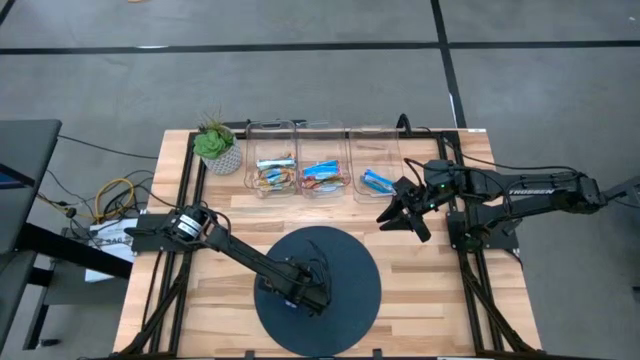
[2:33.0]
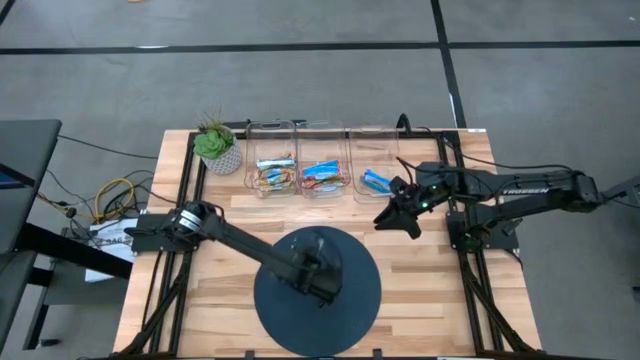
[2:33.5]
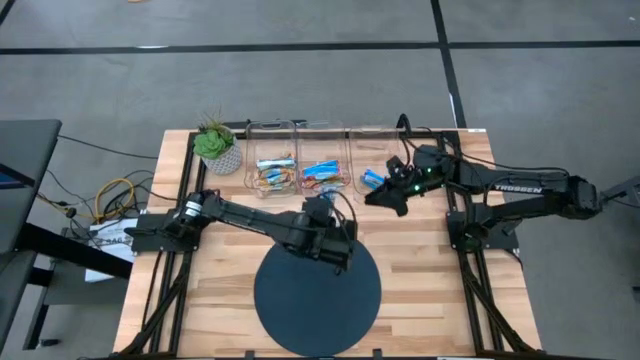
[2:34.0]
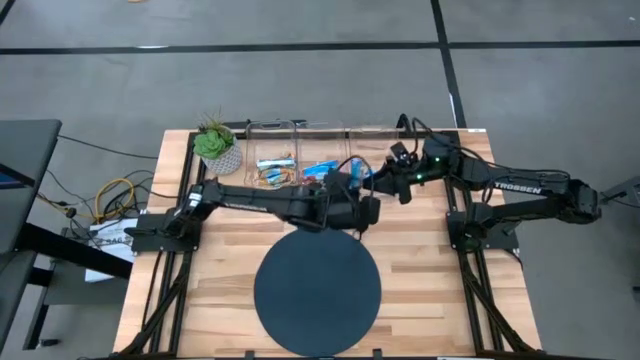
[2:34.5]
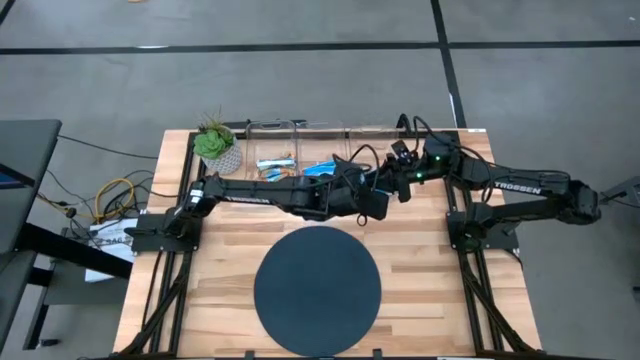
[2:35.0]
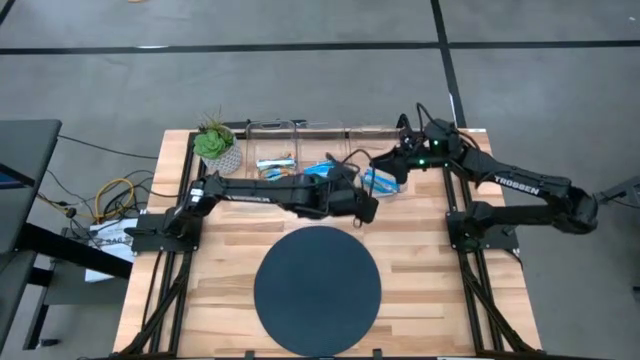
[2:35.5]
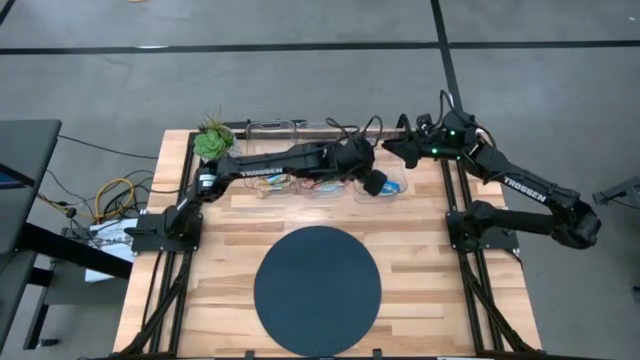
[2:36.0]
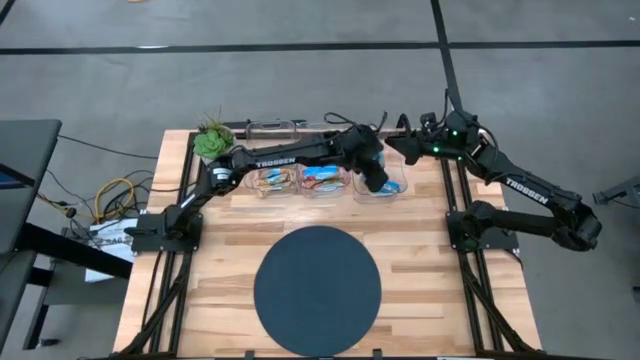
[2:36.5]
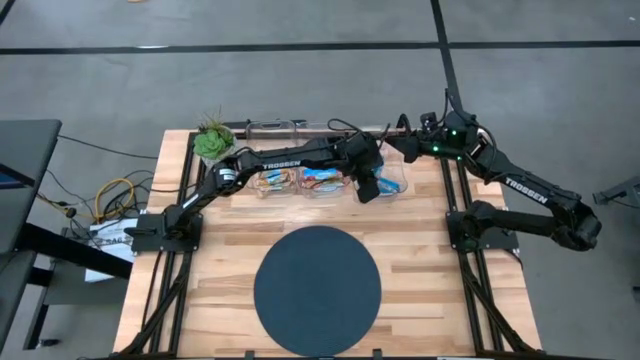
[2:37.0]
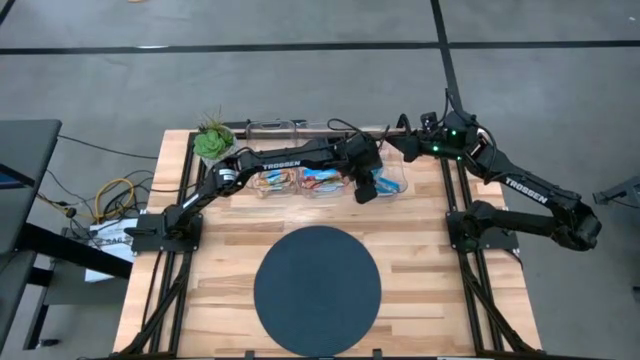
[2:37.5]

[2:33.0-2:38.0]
Task: Pick and place Granola Bars by type
Put the blue bar into the right transparent bin

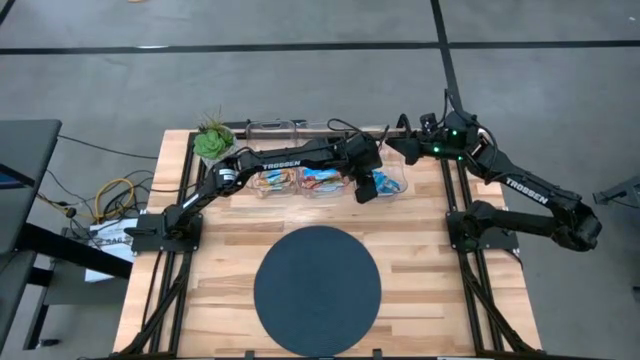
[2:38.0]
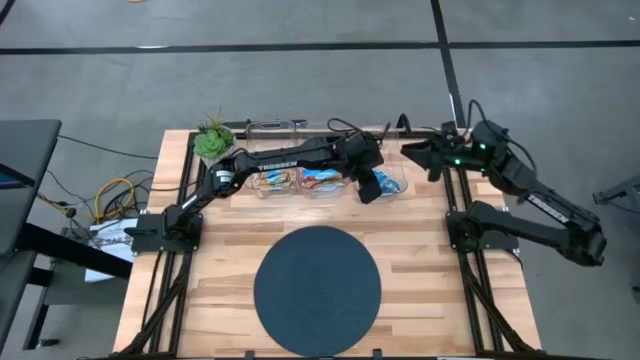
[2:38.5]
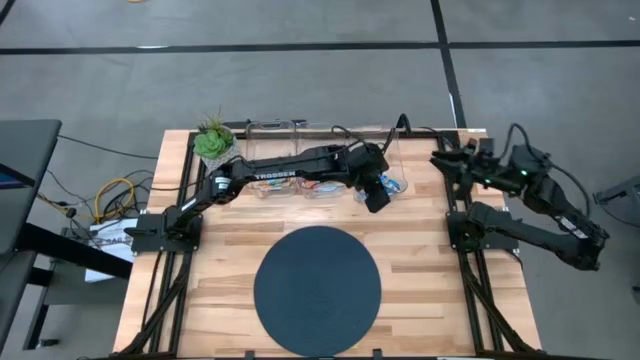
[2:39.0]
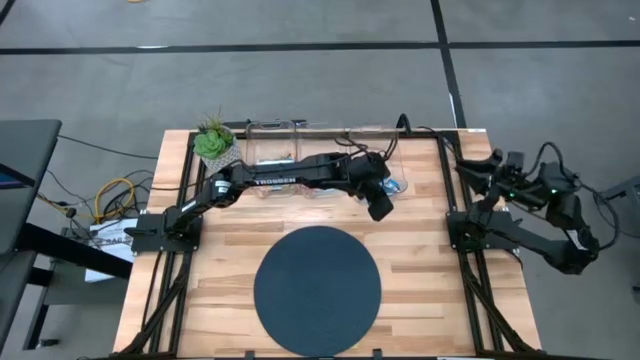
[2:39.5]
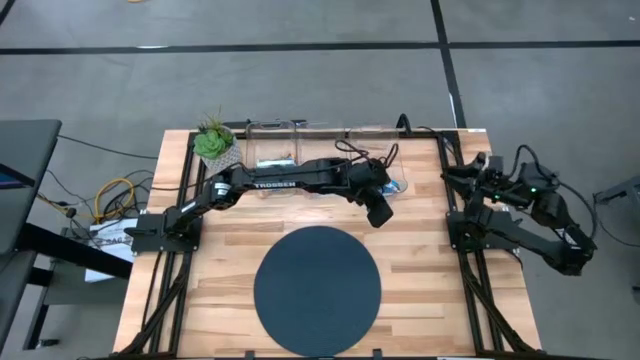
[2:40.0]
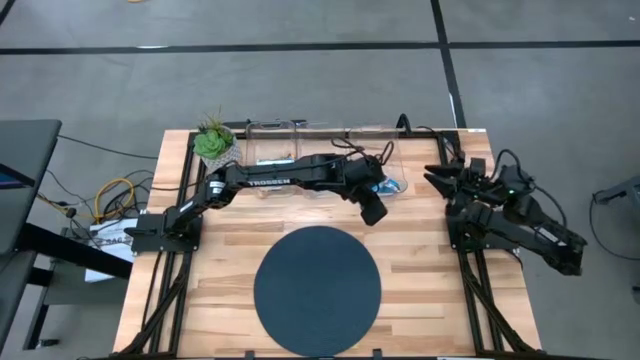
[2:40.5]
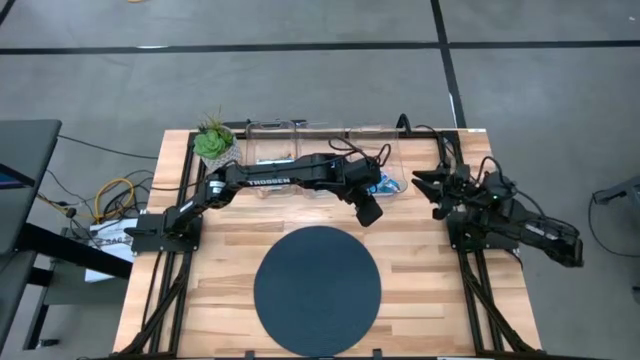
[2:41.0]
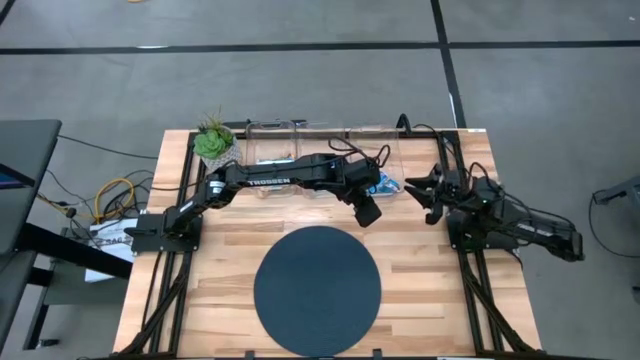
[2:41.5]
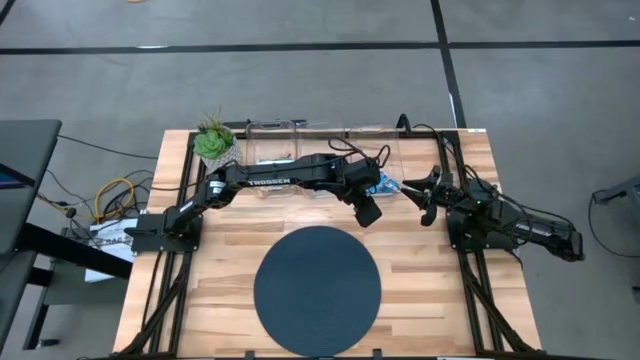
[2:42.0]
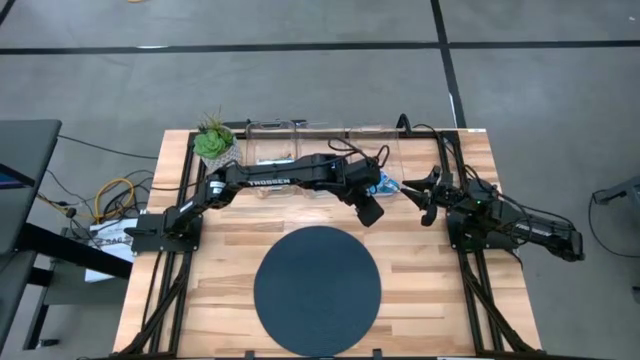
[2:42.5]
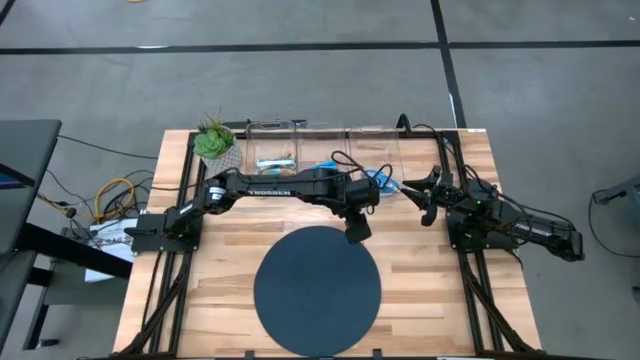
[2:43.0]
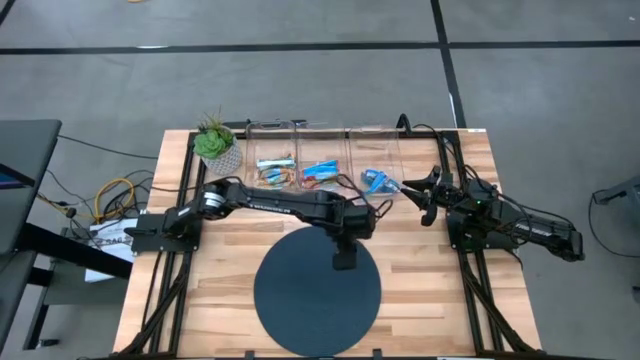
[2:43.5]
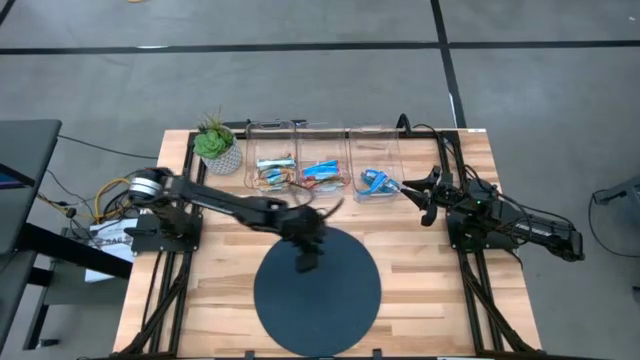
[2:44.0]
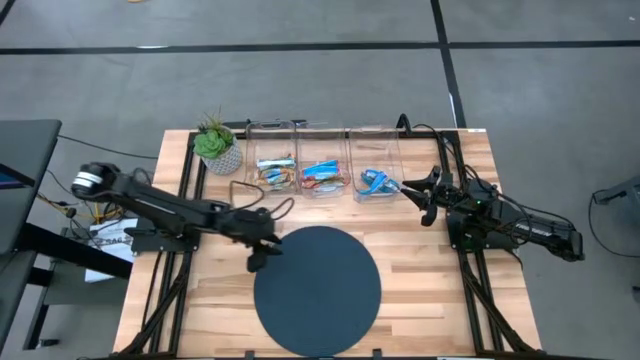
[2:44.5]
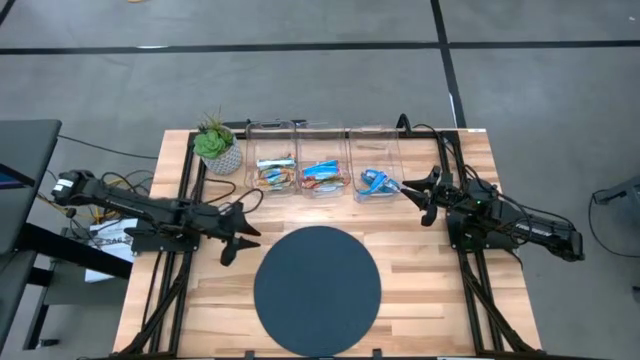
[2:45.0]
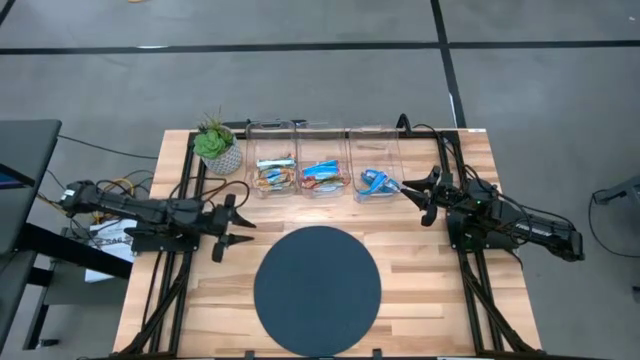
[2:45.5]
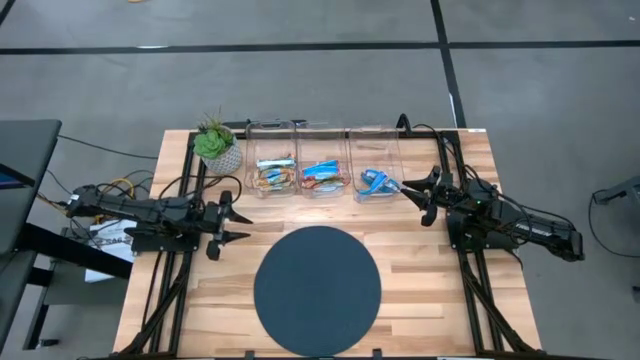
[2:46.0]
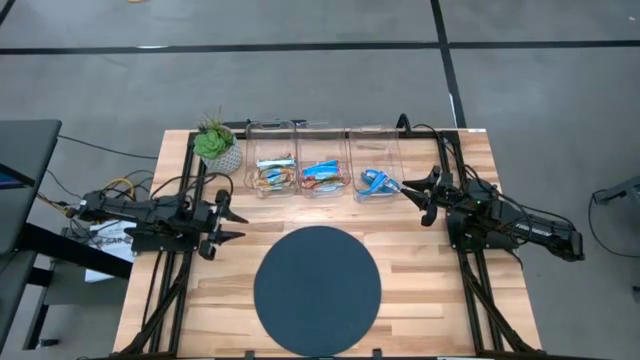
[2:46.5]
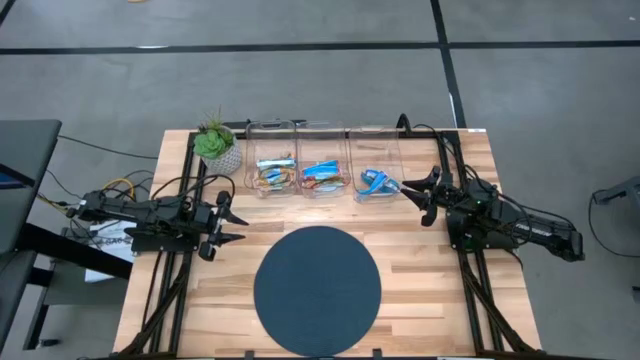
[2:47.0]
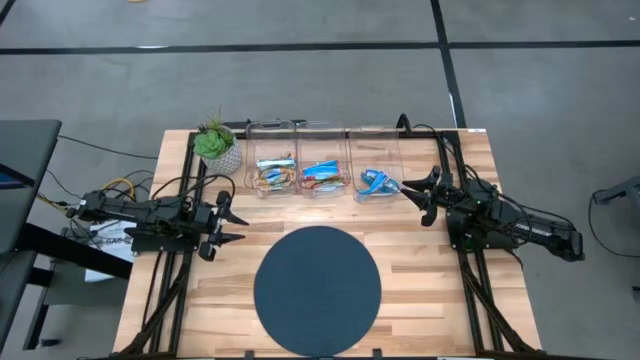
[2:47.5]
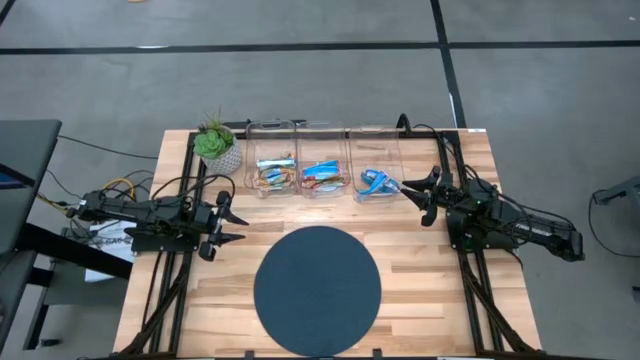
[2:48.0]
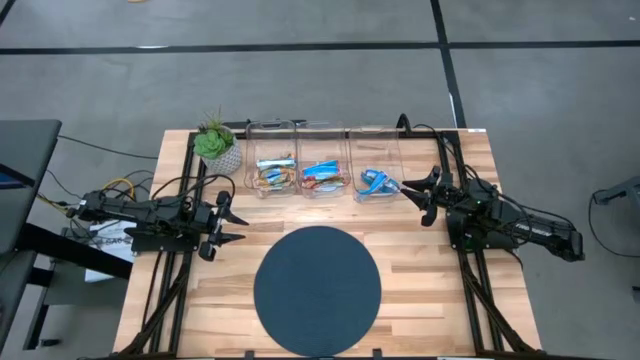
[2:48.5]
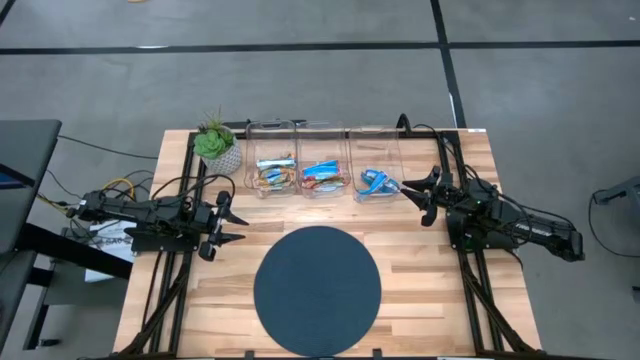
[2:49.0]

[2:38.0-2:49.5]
Return to Home Position

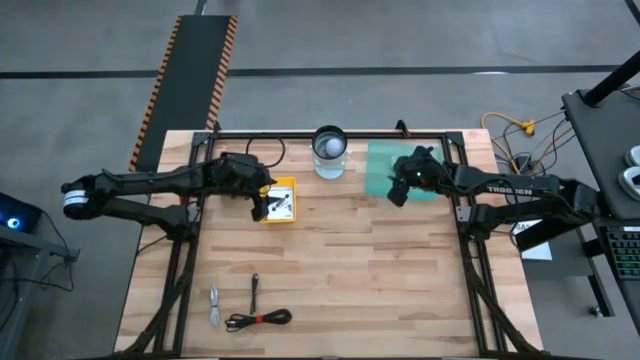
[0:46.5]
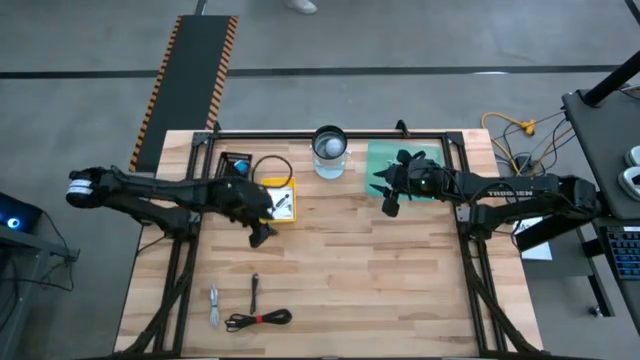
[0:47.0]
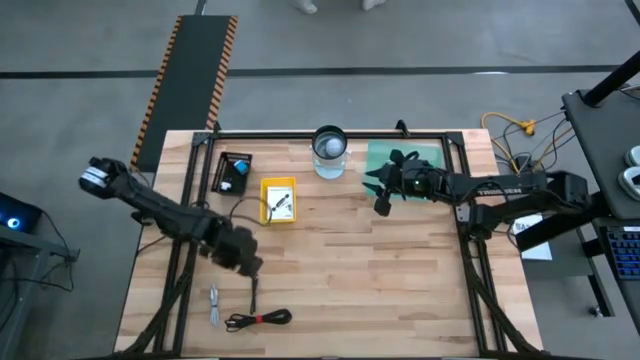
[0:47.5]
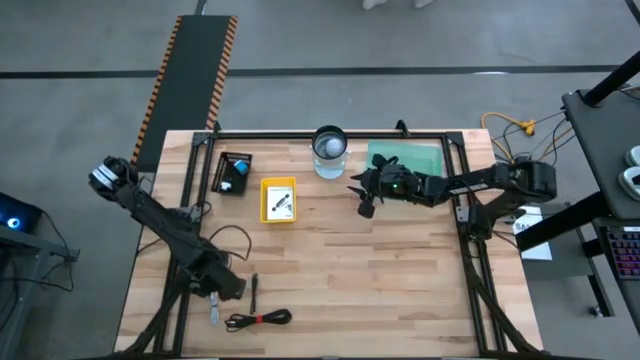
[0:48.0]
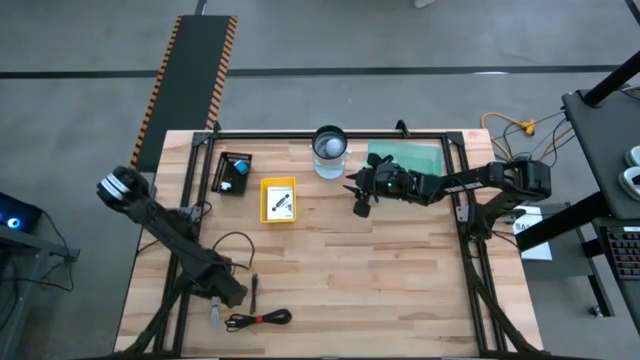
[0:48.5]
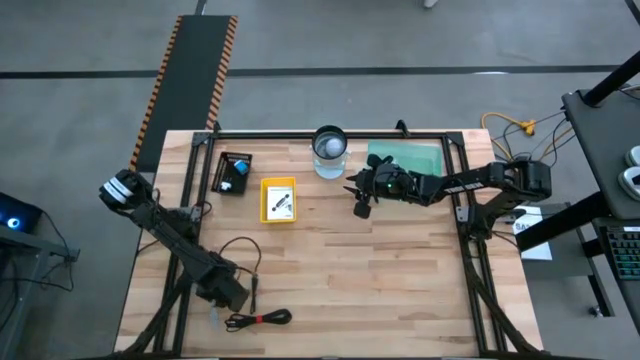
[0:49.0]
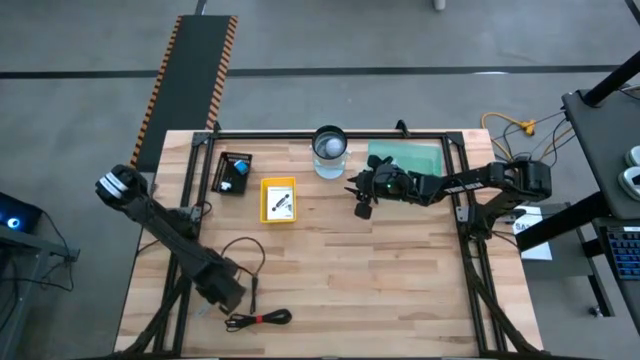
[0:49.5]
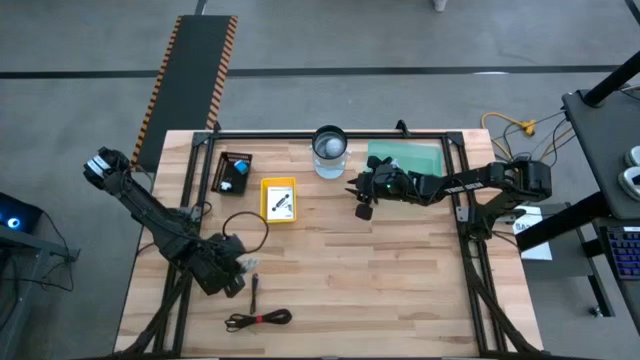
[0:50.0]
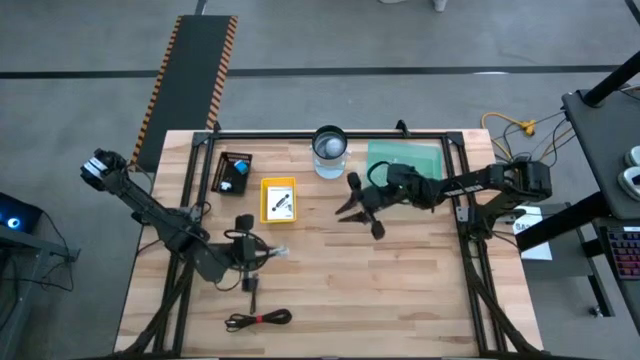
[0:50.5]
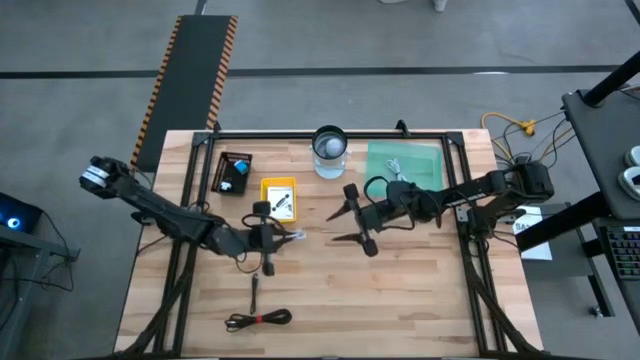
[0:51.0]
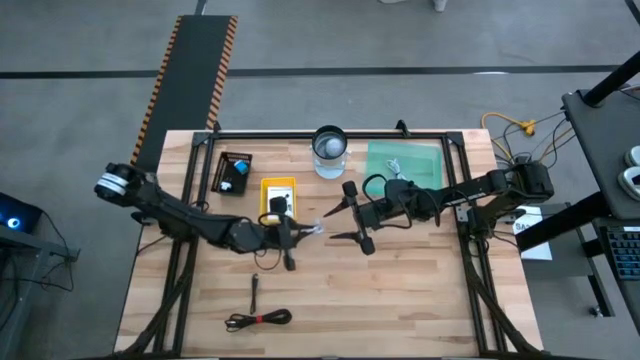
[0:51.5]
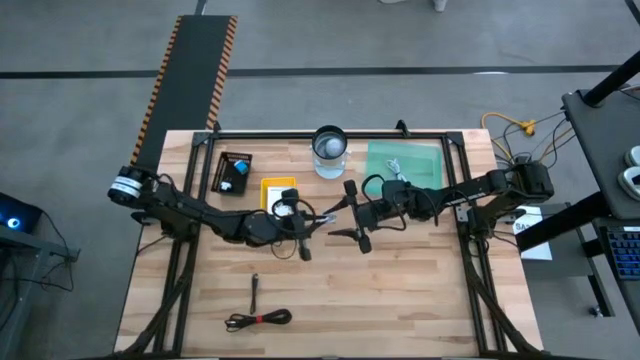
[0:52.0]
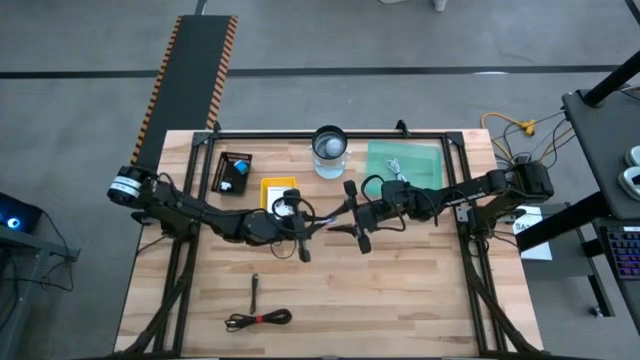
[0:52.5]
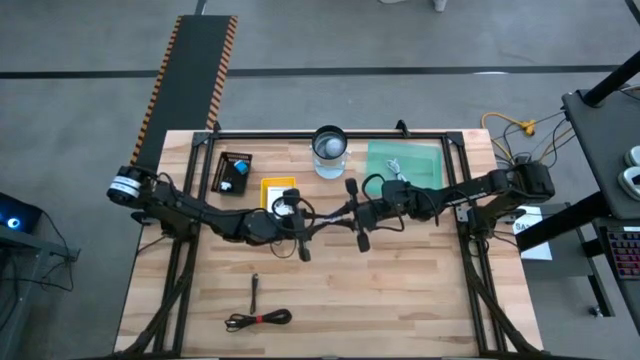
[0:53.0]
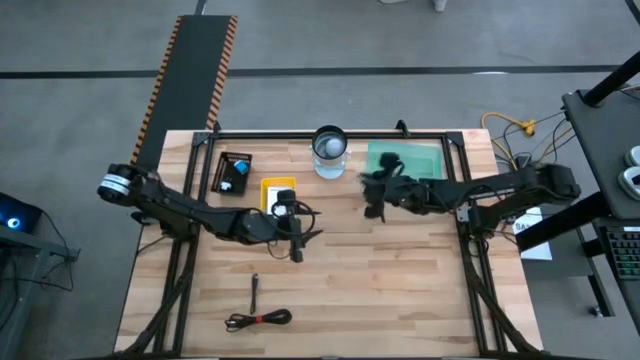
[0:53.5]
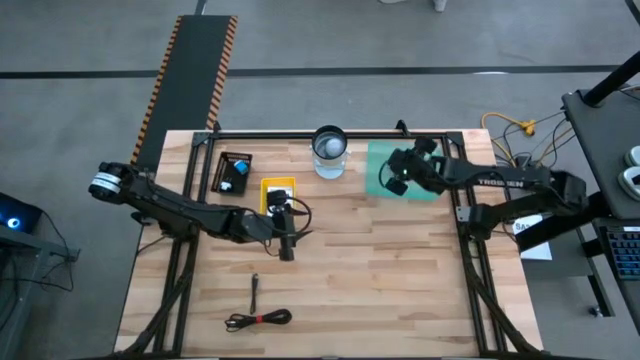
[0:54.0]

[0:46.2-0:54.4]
Task: Pick and place items into bin
Put the white cable charger into the light blue bin
